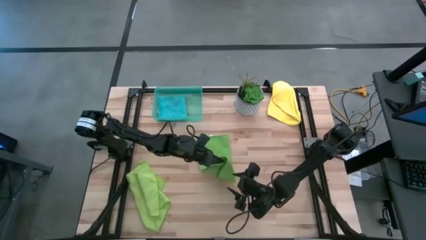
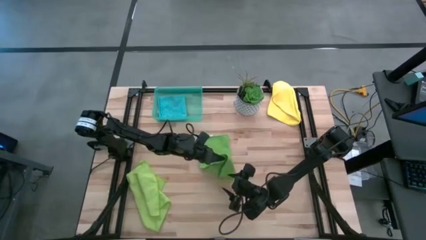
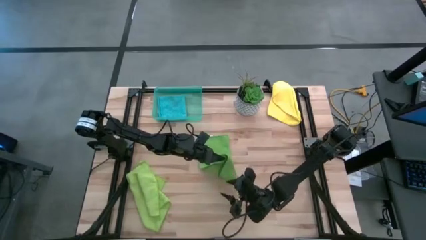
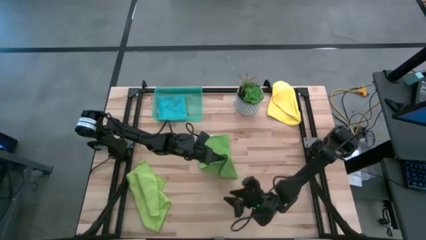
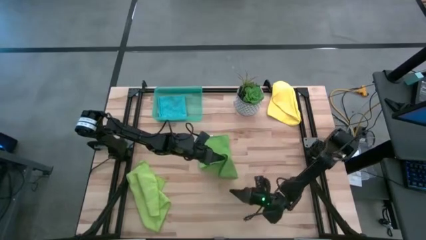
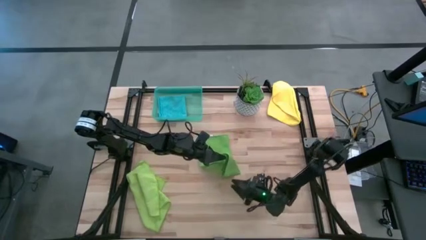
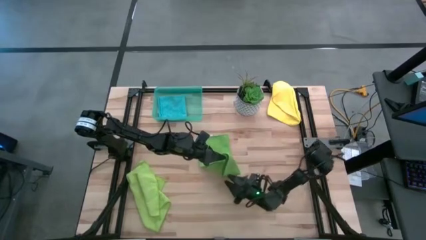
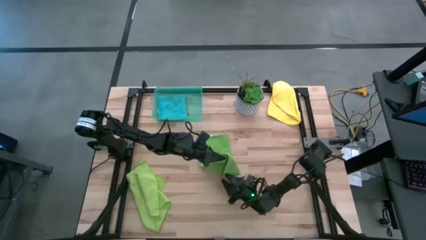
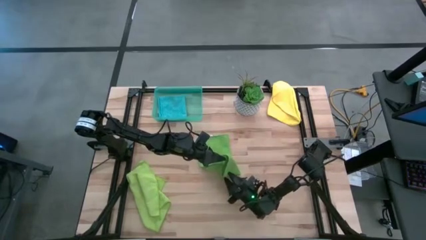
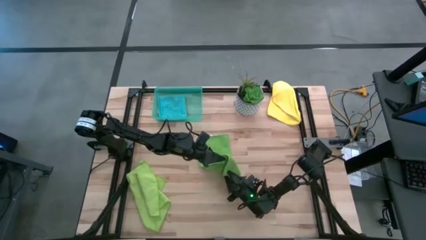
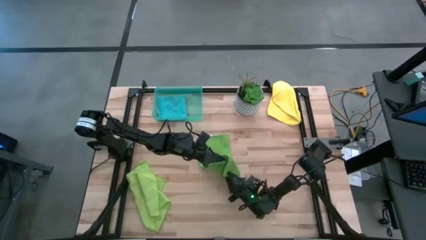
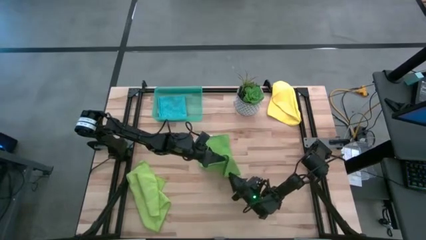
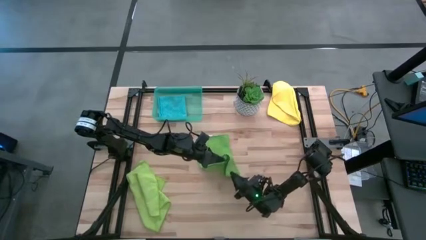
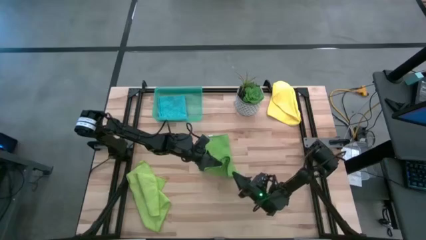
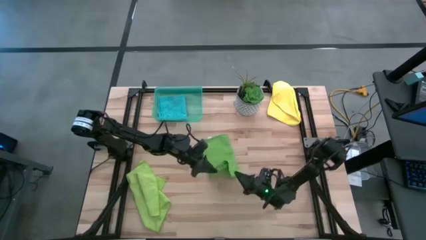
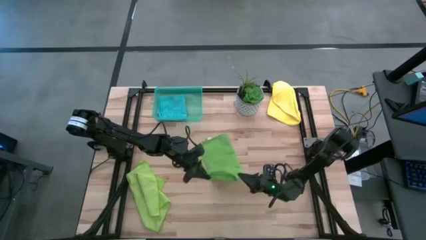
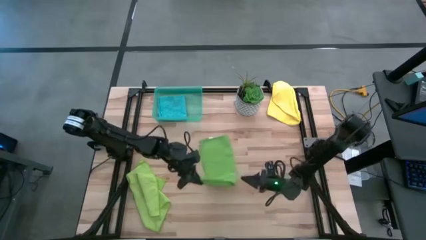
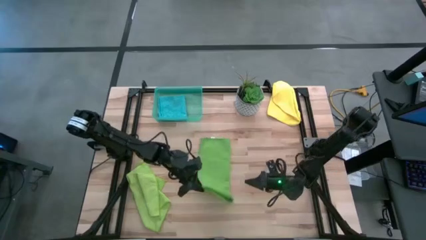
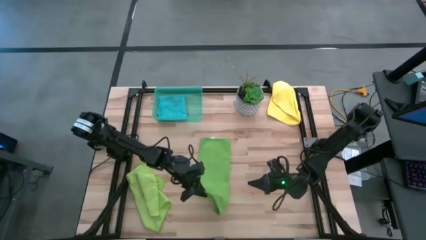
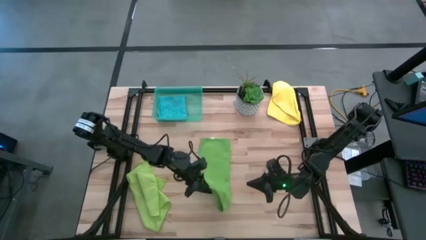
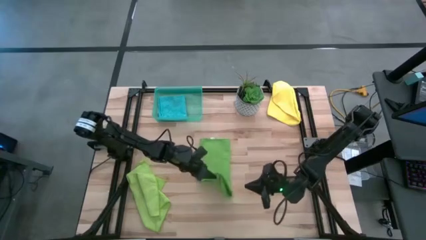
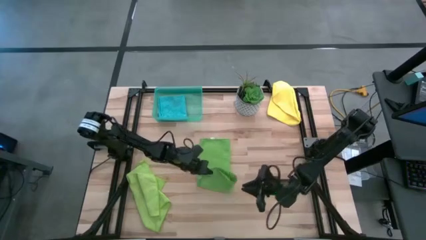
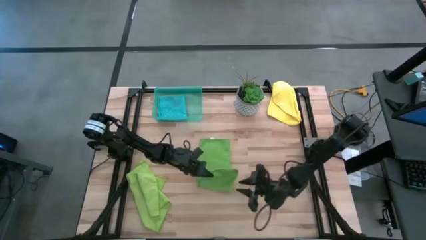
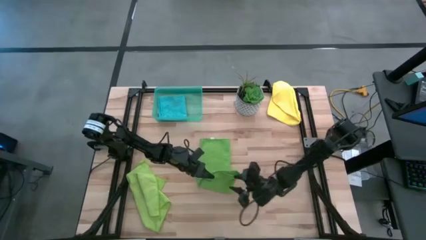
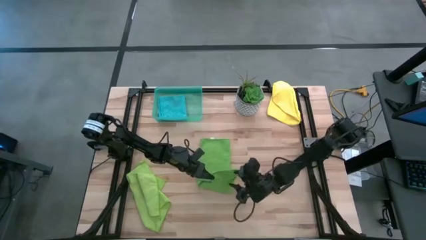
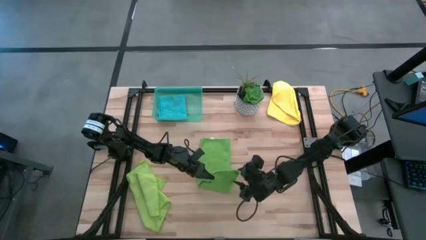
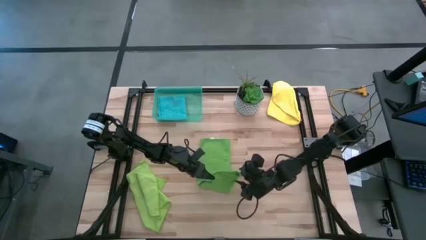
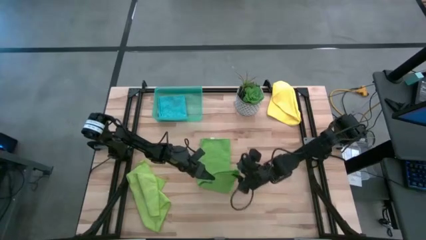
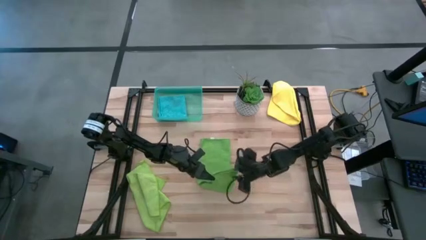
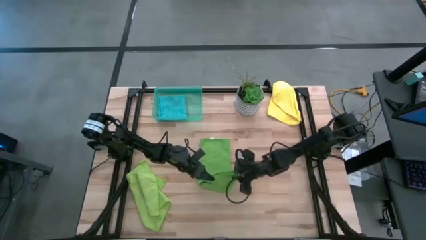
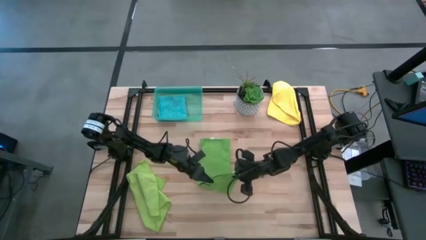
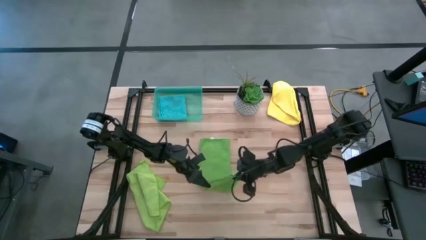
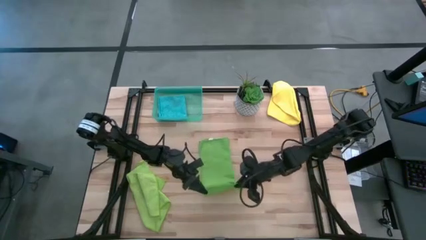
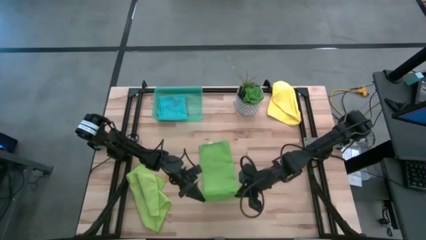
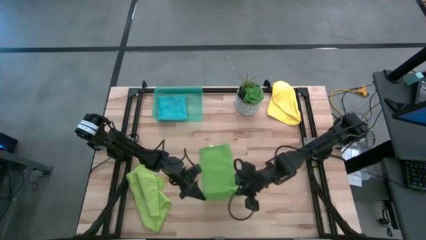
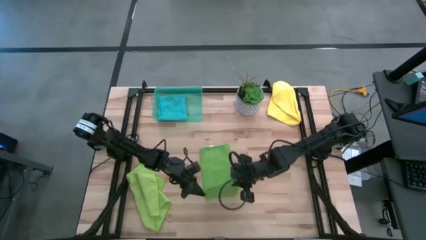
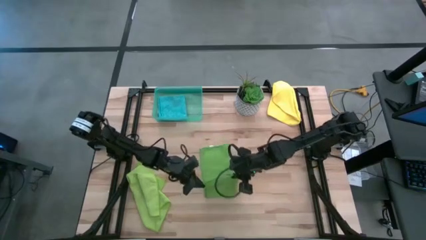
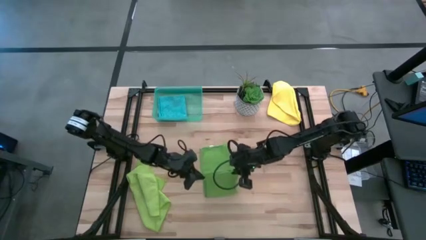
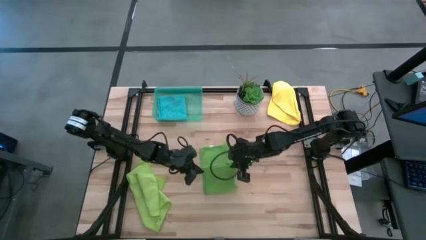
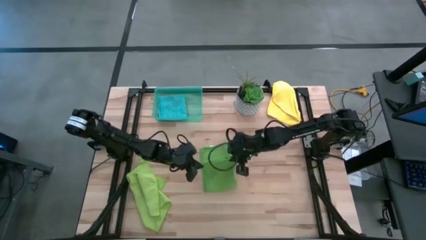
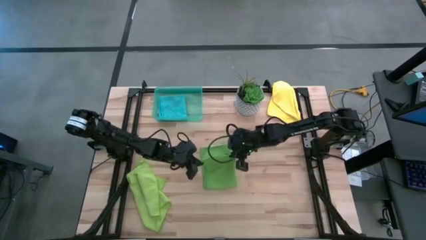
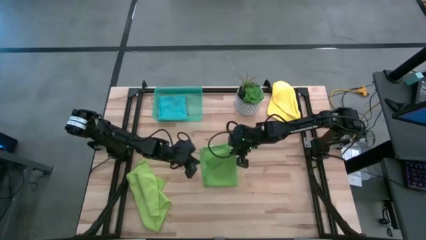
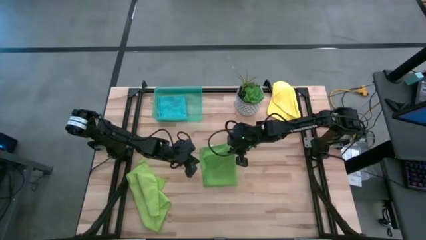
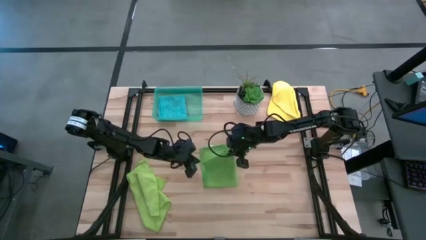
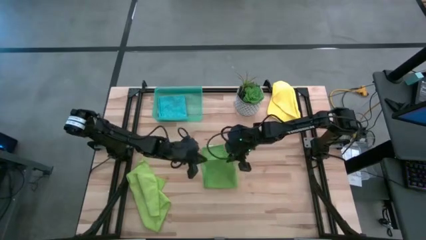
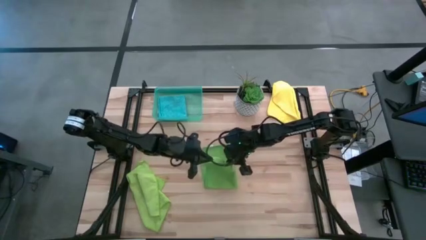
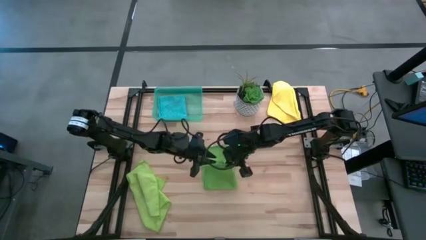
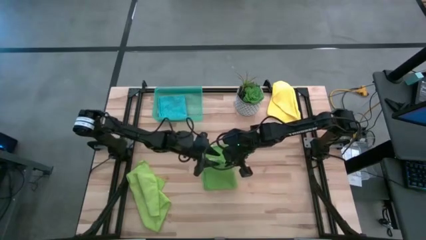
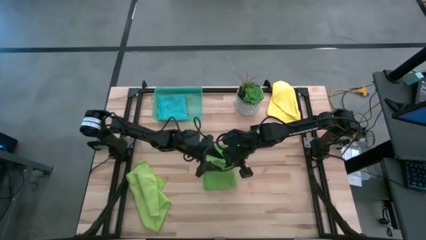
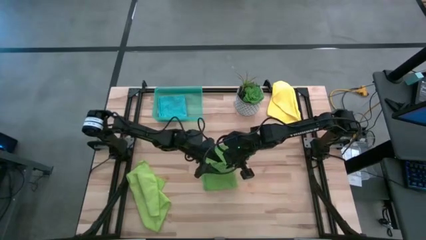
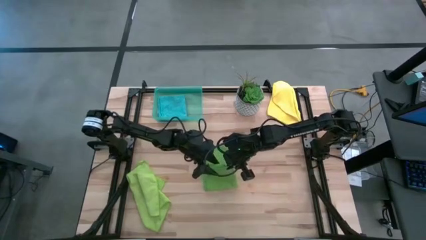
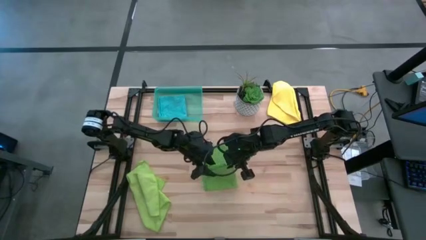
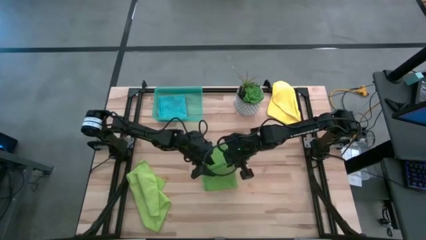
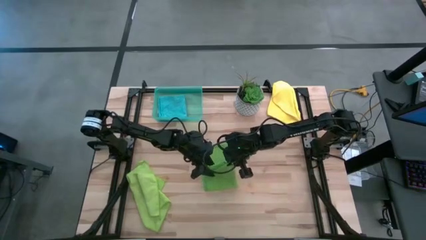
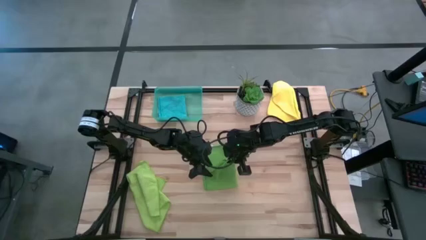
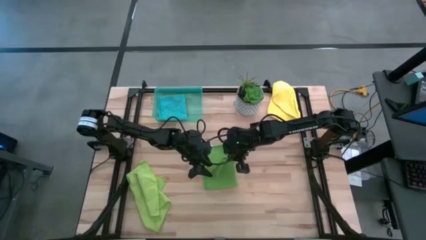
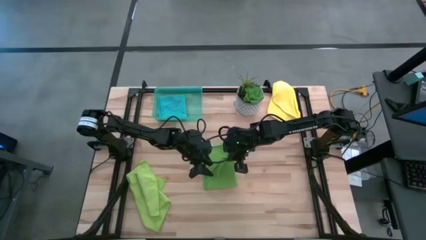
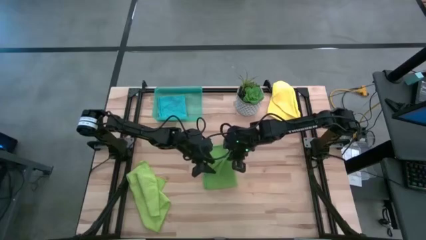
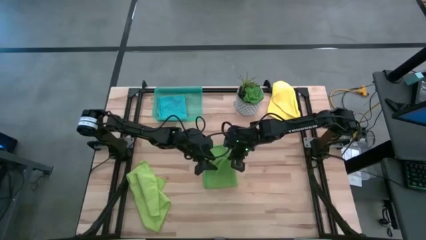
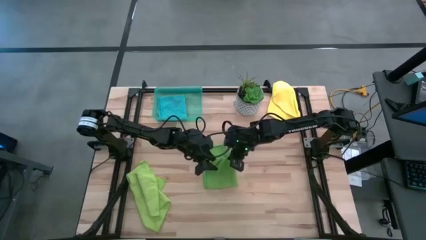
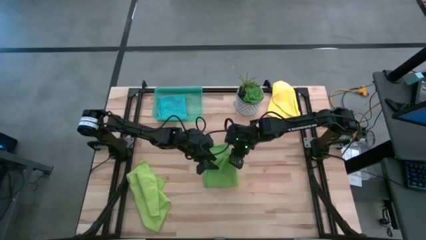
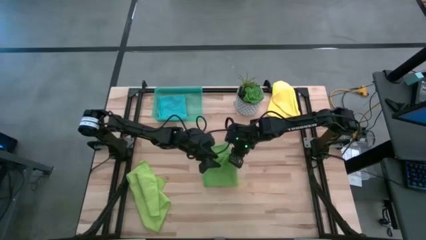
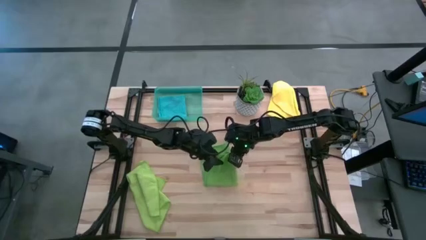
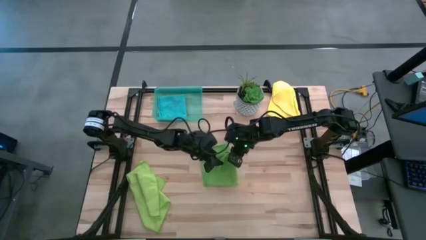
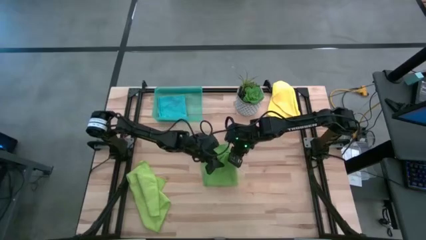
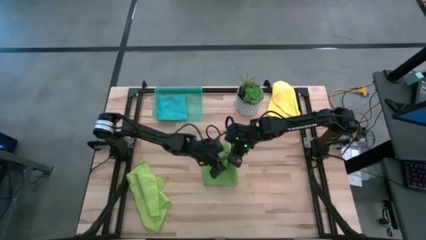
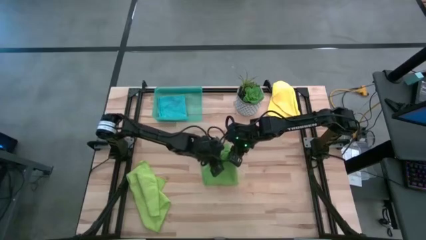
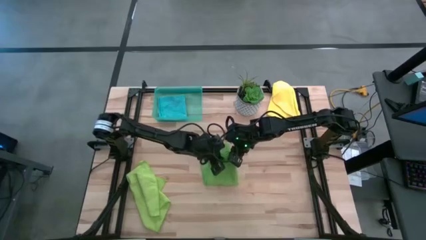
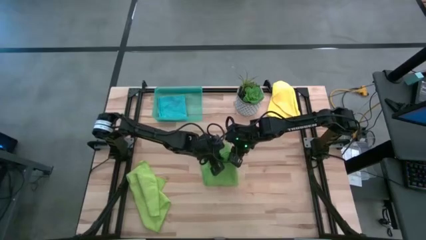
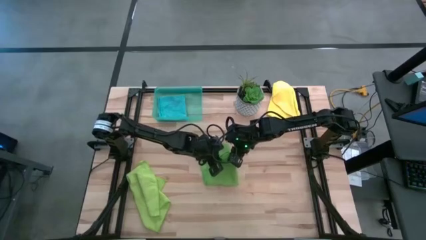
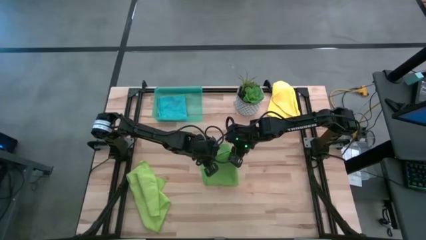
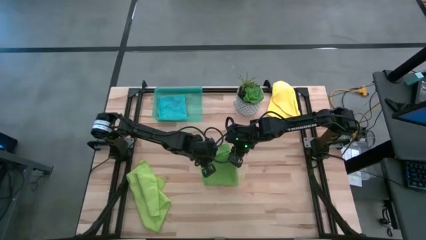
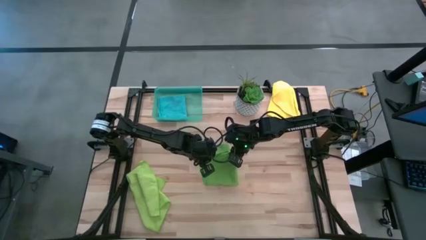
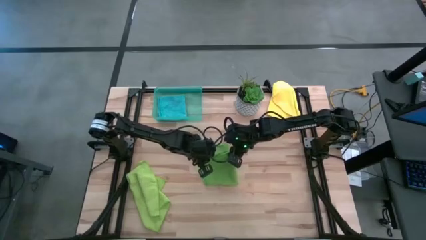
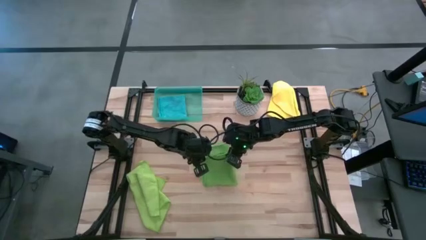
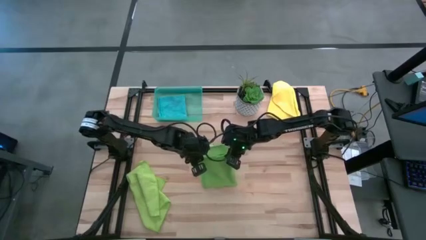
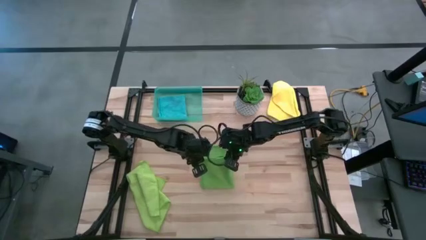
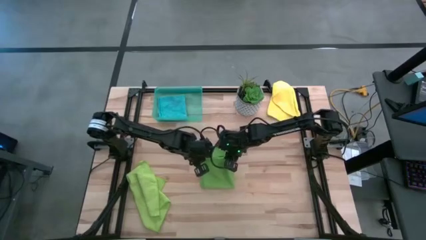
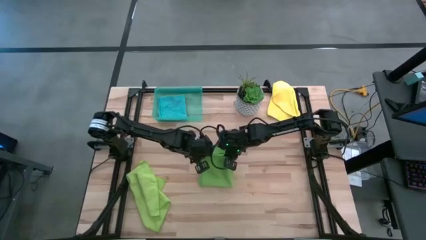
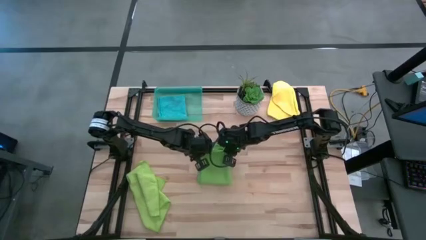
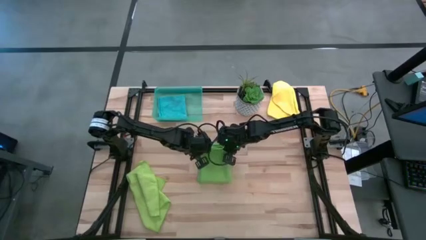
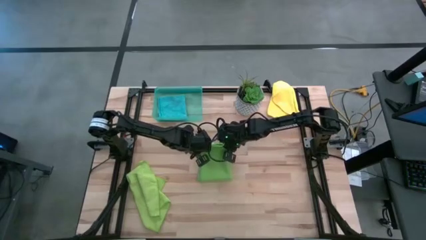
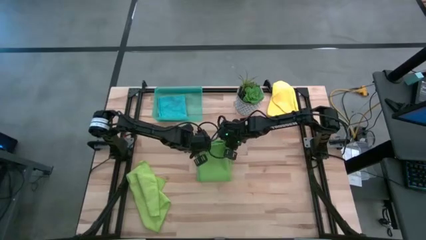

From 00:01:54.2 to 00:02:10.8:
Task: Fold microfiber towels
Fold the green microfiber cloth
